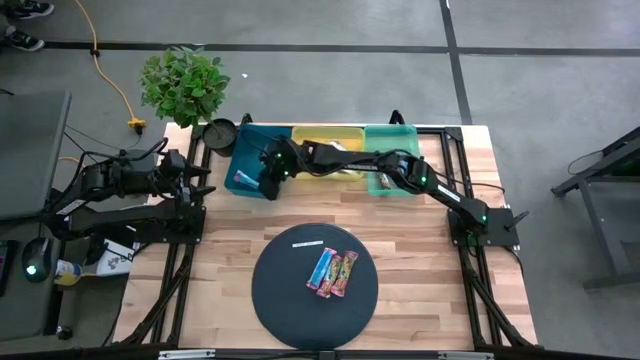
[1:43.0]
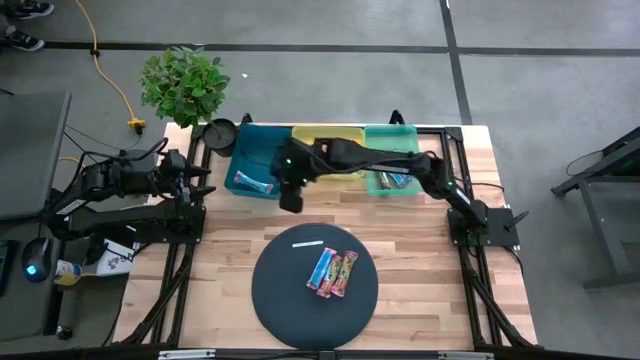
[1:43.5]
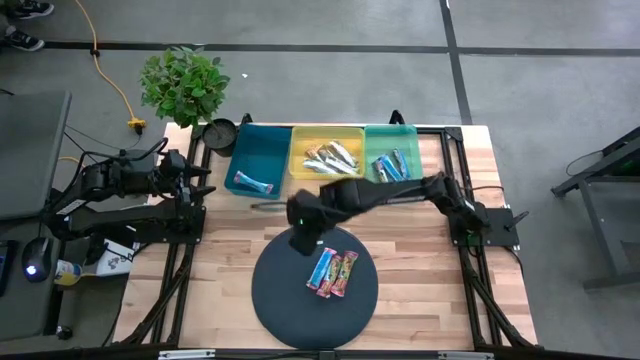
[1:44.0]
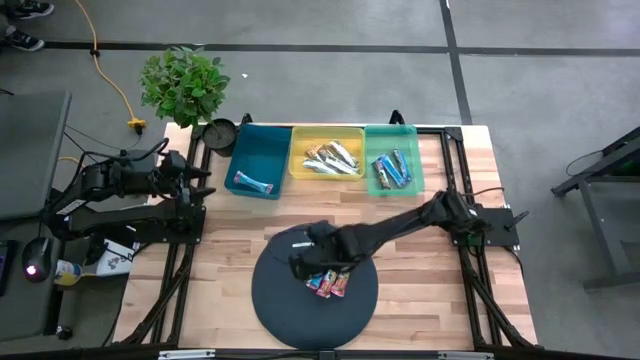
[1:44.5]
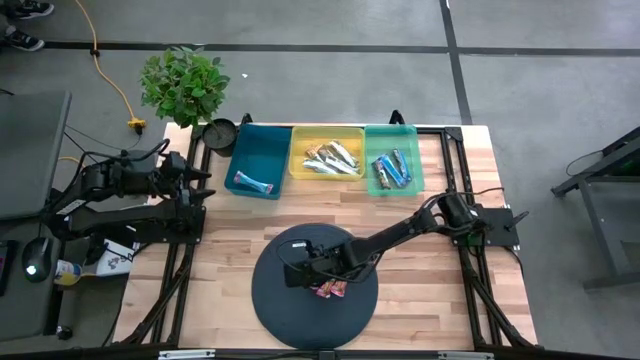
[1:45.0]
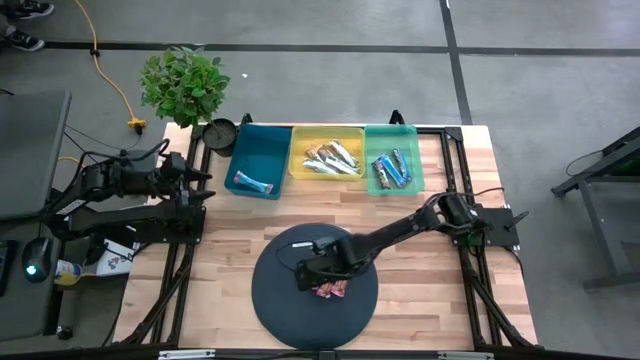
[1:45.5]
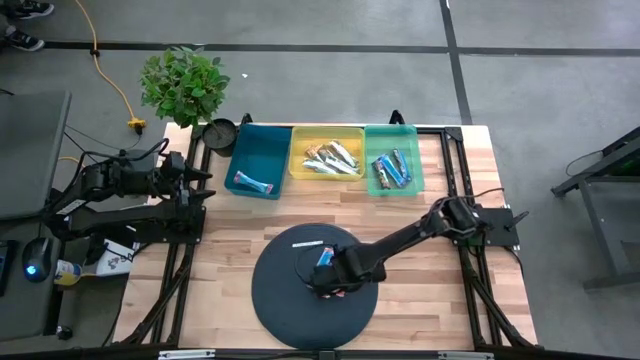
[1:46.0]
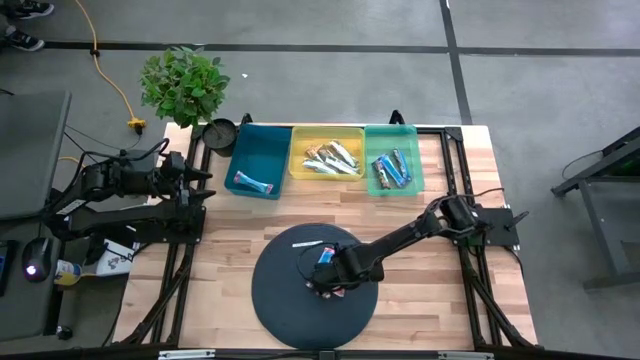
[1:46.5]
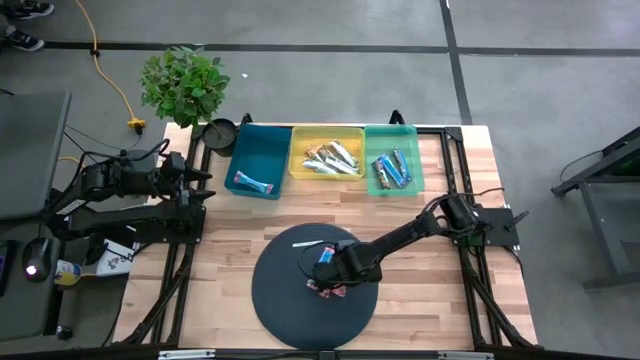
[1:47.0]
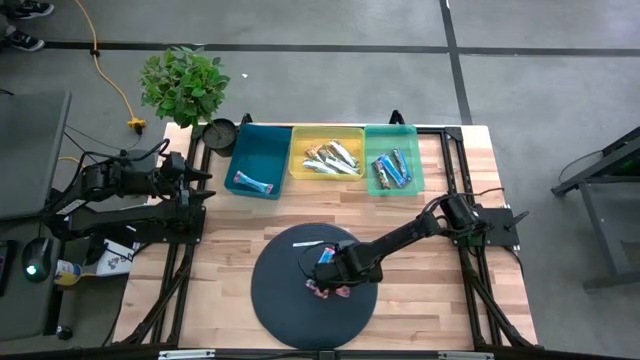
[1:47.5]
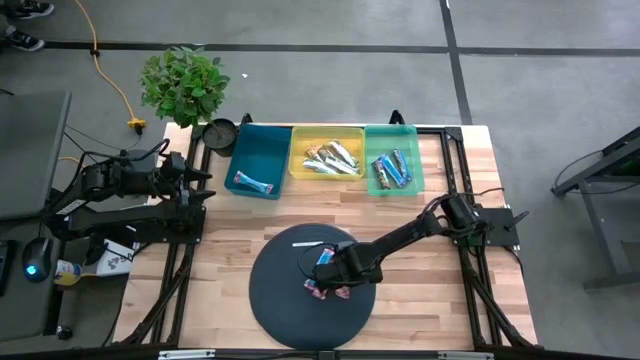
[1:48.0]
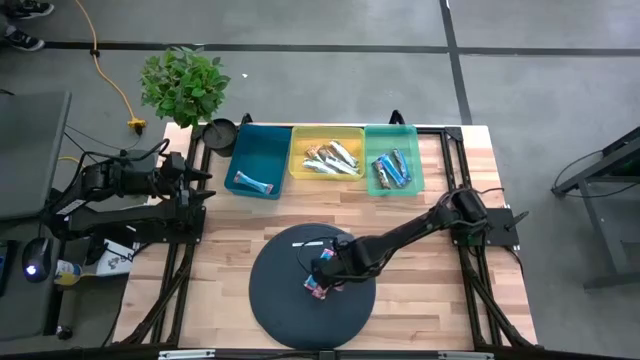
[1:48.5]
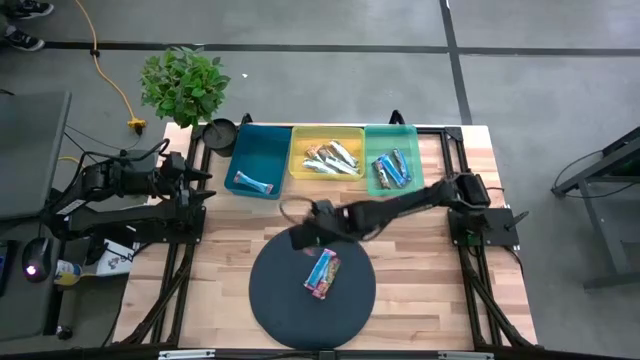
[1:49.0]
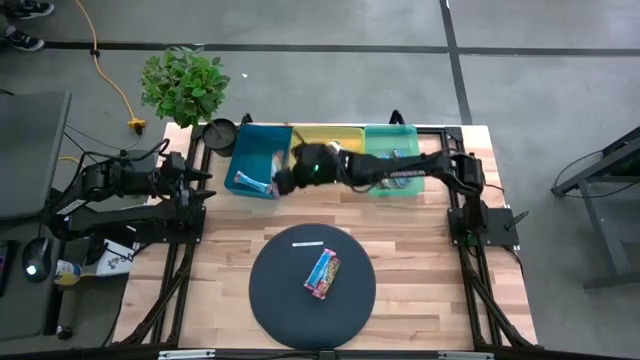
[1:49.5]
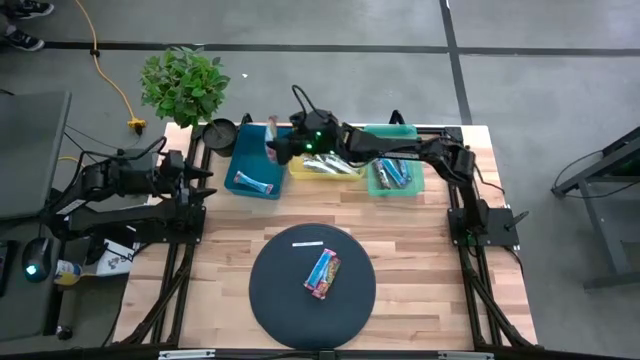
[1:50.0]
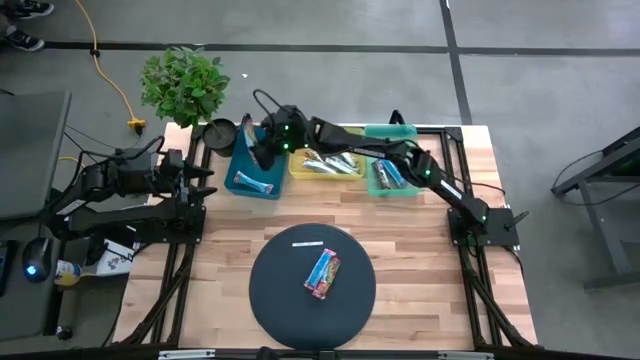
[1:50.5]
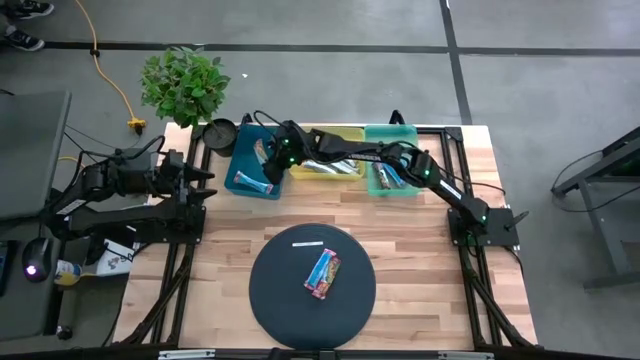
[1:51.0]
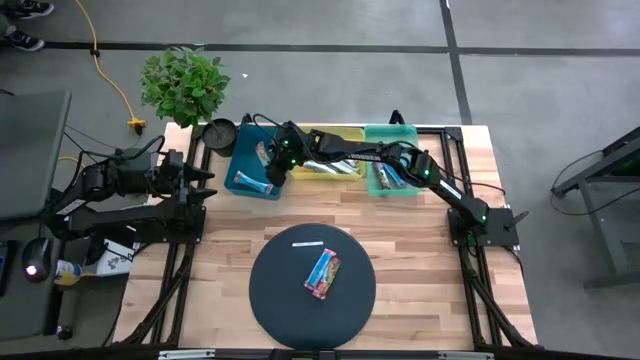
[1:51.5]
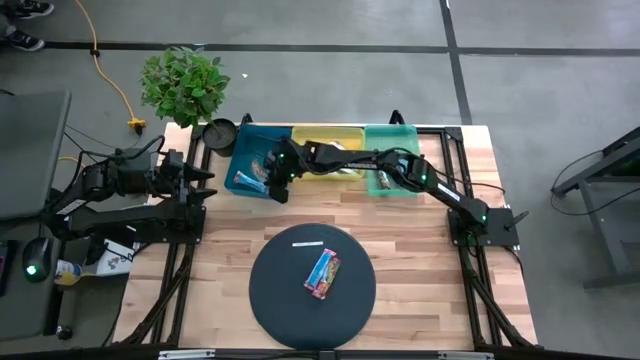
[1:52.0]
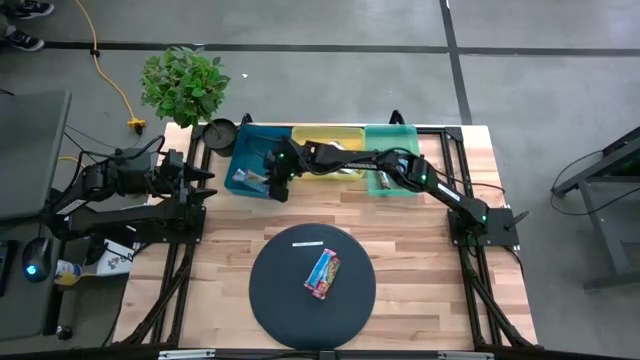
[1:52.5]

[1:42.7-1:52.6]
Task: Pick and place Granola Bars by type
Put the red granola bar into the blue bin

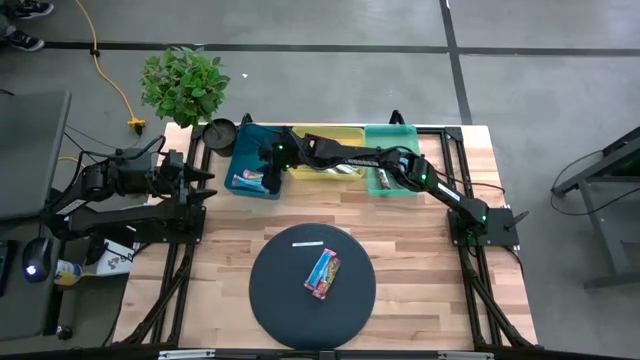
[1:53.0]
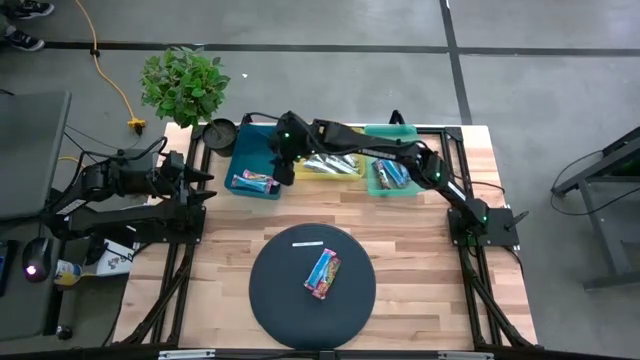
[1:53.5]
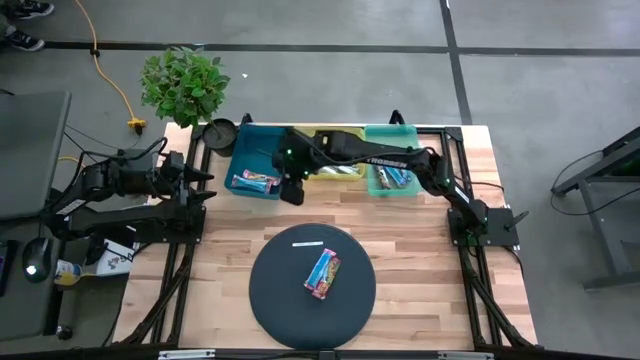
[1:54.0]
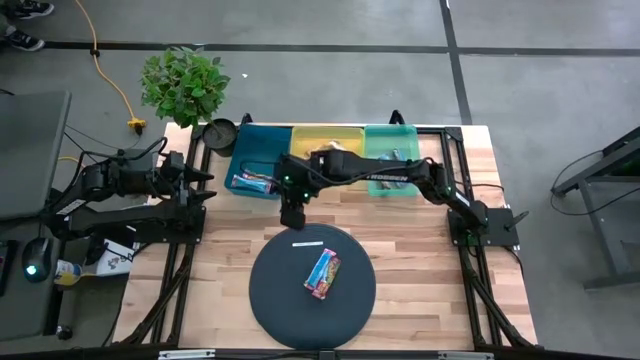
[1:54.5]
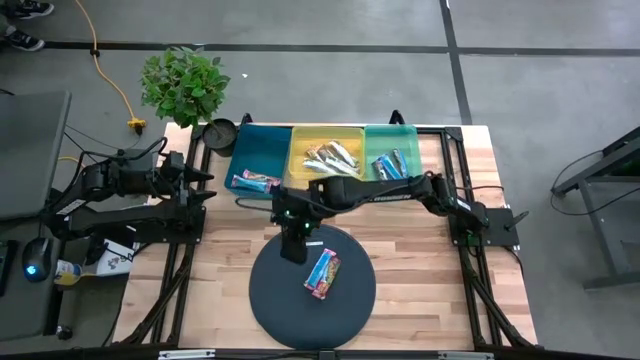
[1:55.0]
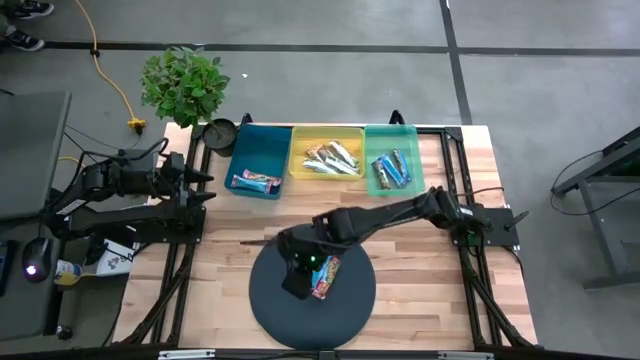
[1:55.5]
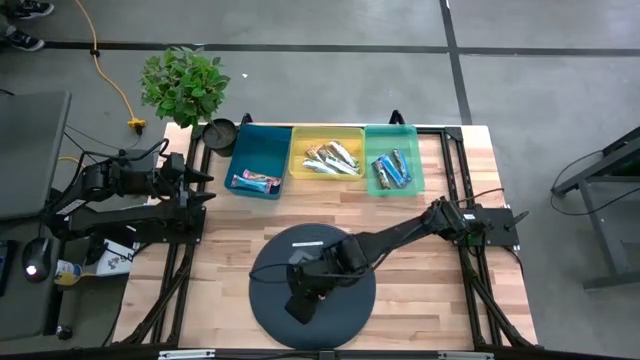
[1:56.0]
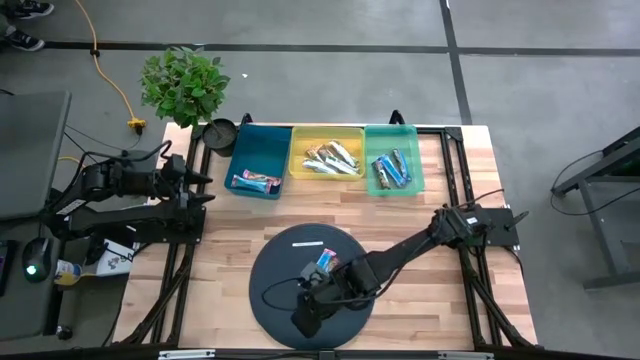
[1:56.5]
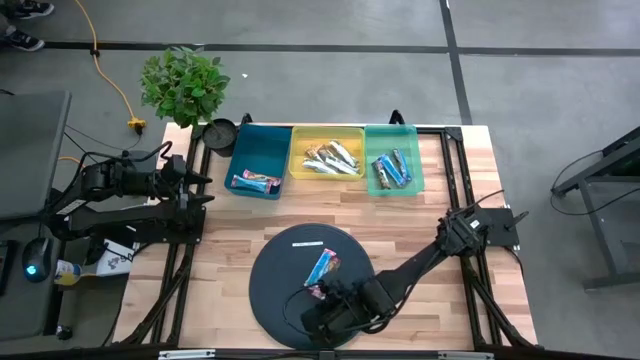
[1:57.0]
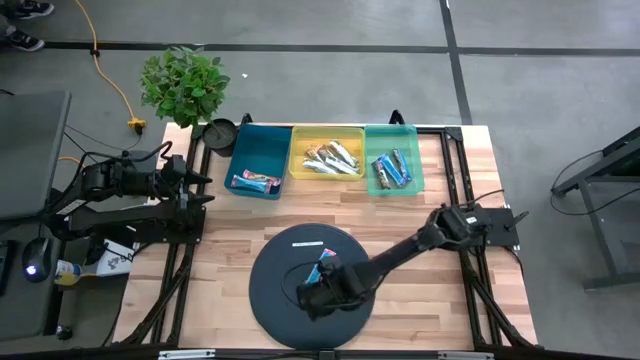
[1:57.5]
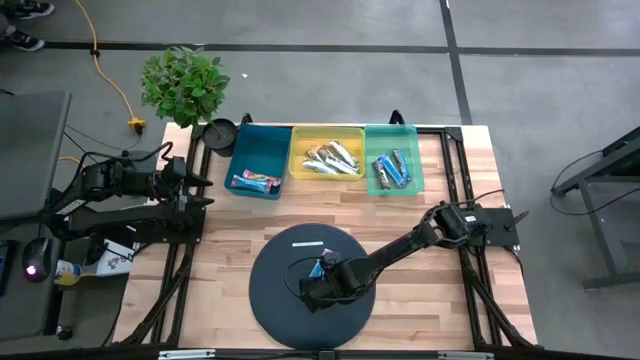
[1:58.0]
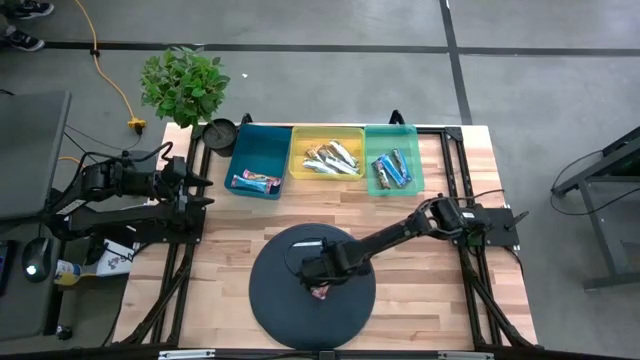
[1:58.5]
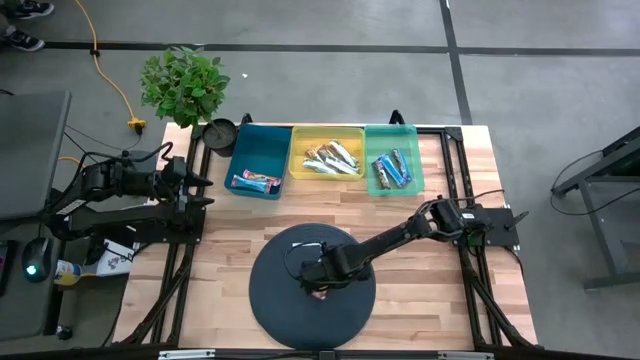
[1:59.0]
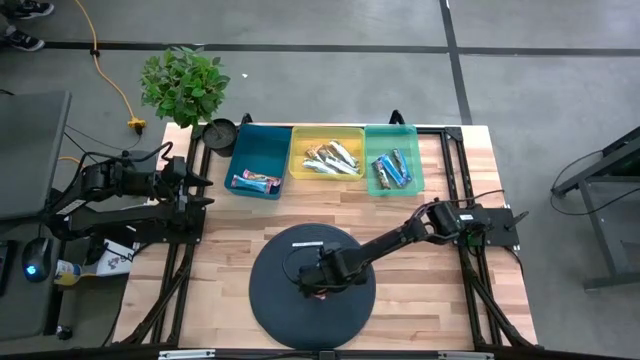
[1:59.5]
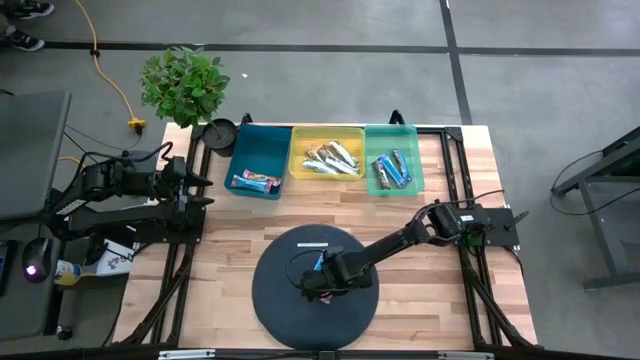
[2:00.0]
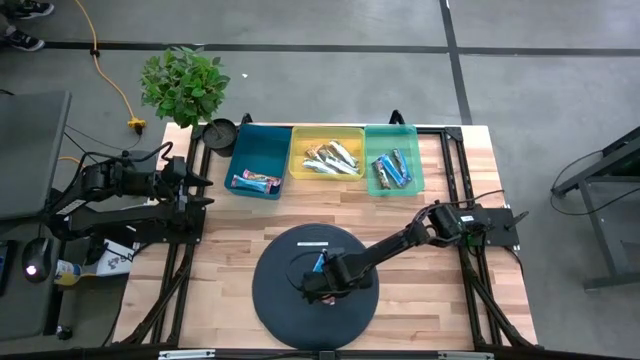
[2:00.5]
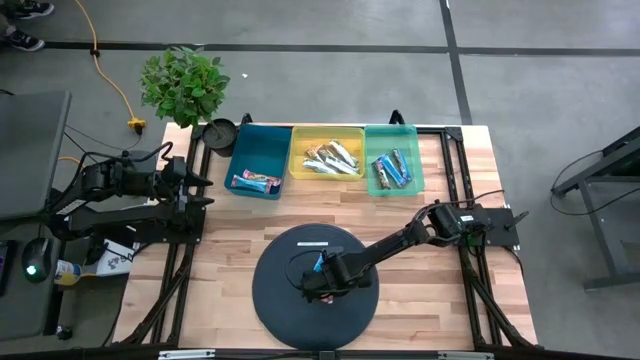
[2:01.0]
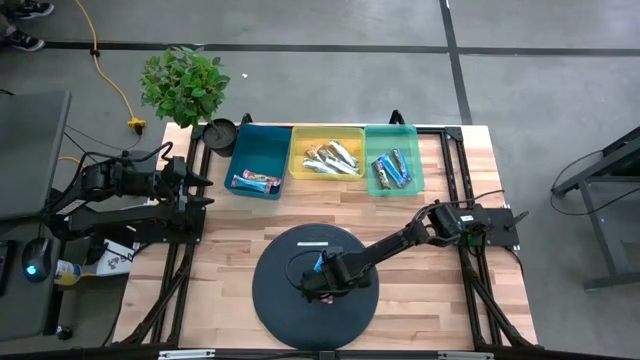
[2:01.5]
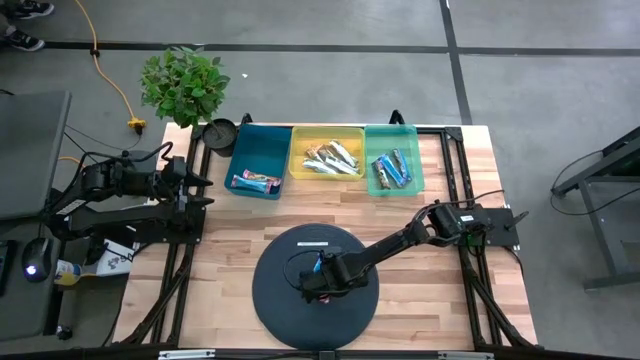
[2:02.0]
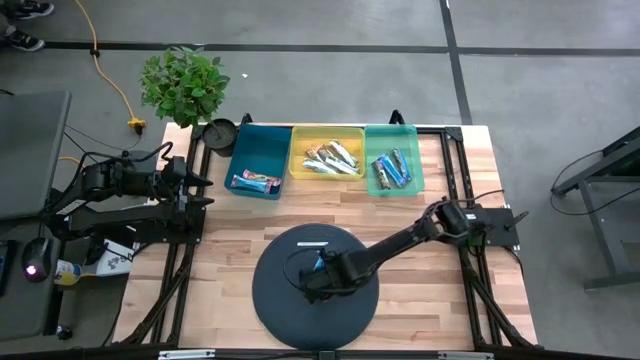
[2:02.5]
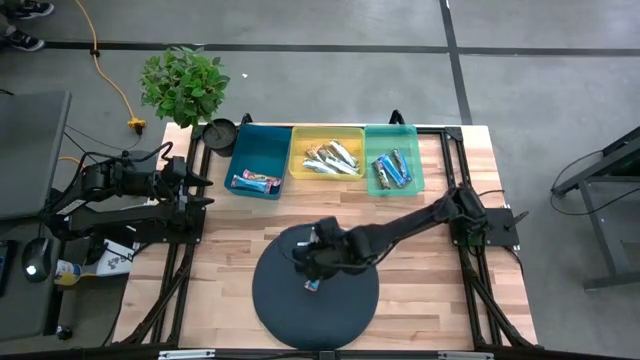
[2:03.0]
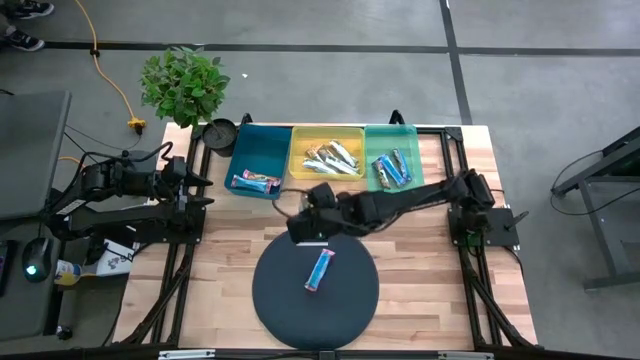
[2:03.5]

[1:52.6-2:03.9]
Put the red granola bar into the blue bin

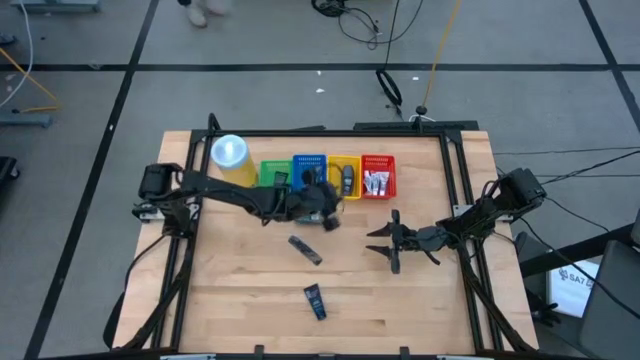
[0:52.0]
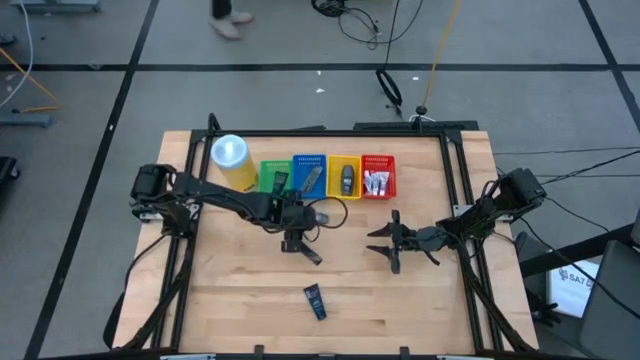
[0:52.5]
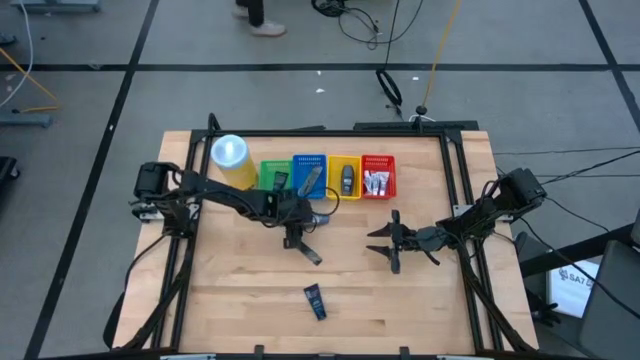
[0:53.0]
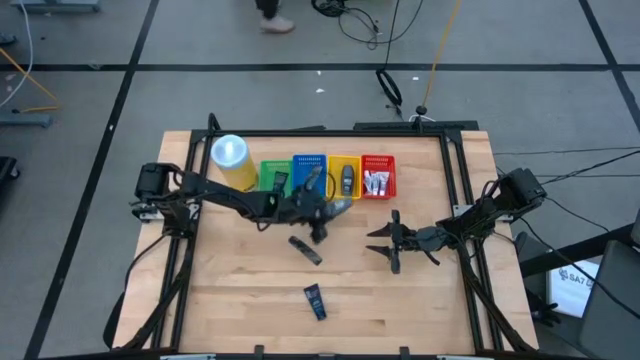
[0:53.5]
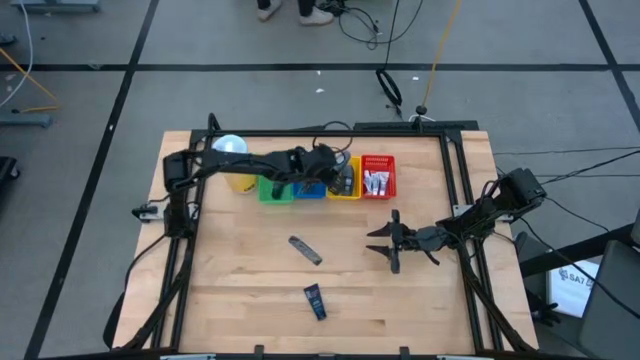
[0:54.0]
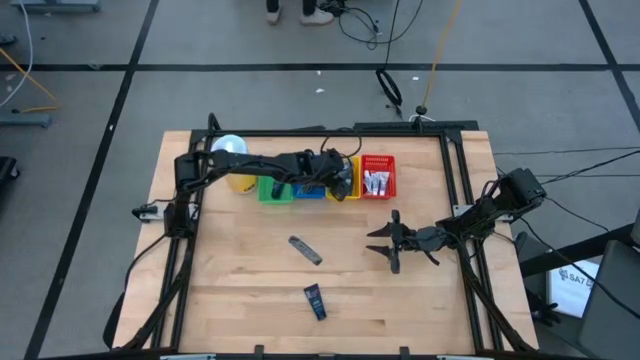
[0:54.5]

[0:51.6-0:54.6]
Task: Pick & Place Travel size toiletries
Put the deodorant into the yellow basket
